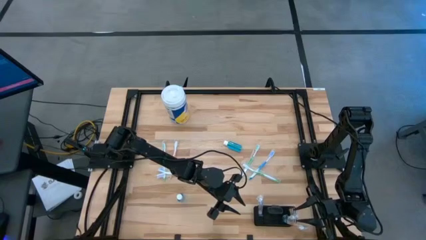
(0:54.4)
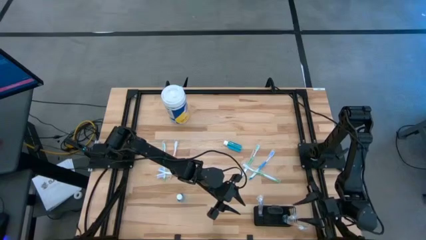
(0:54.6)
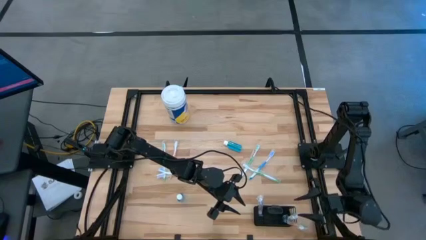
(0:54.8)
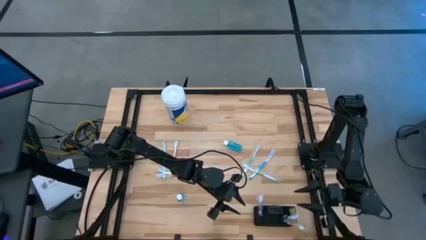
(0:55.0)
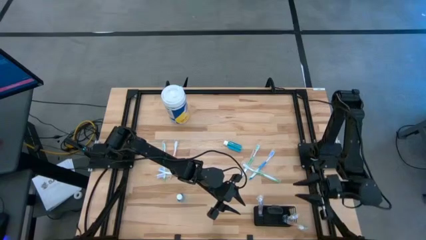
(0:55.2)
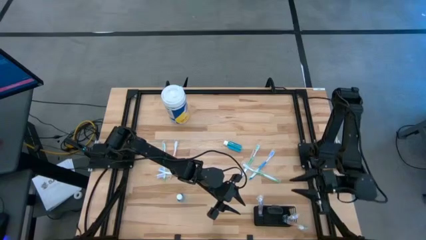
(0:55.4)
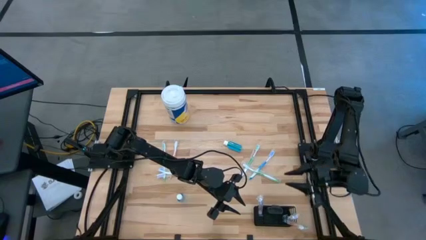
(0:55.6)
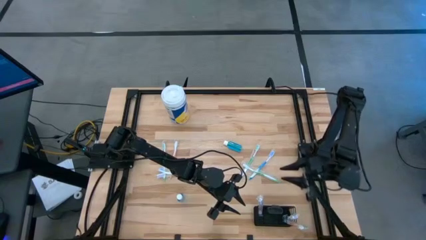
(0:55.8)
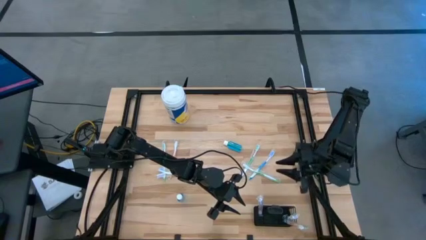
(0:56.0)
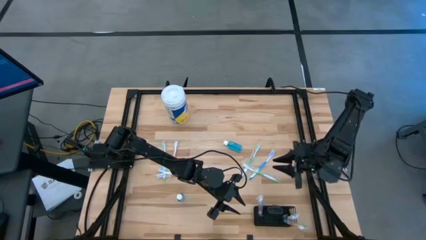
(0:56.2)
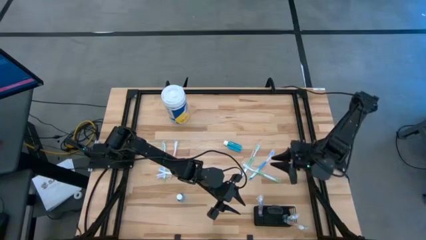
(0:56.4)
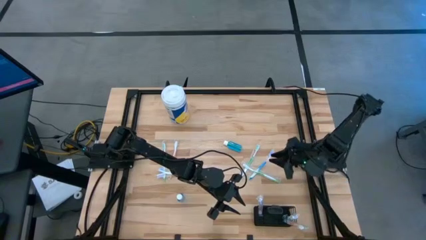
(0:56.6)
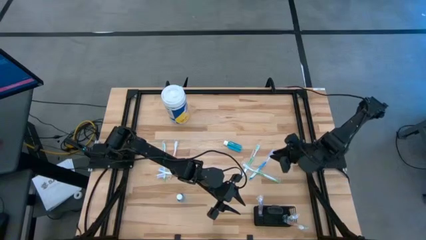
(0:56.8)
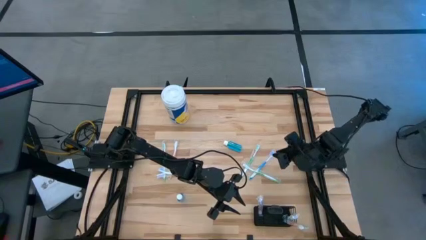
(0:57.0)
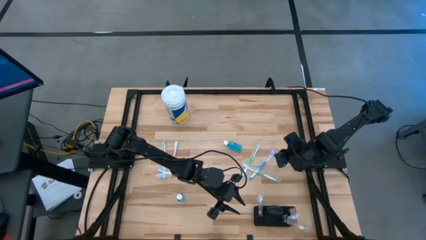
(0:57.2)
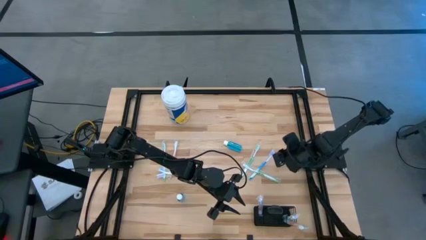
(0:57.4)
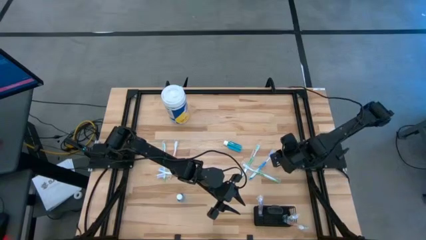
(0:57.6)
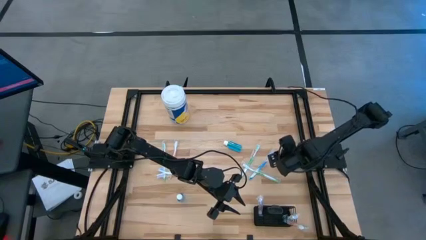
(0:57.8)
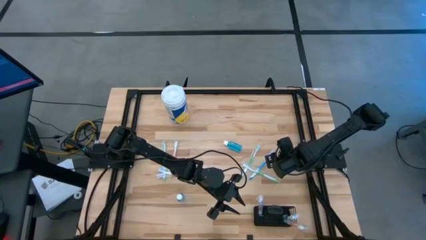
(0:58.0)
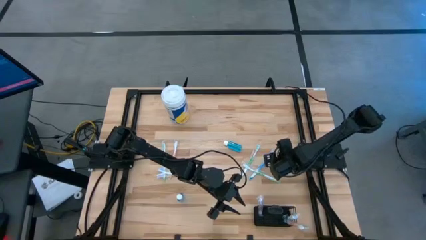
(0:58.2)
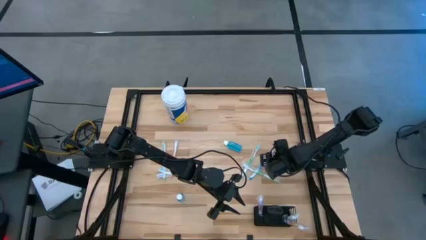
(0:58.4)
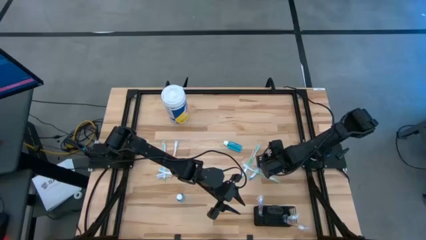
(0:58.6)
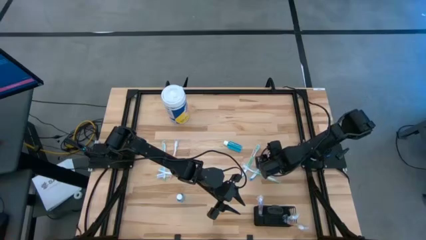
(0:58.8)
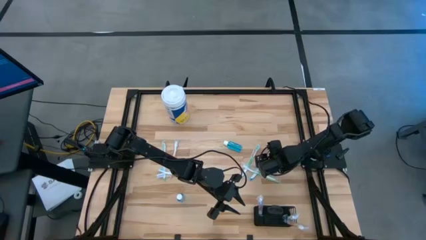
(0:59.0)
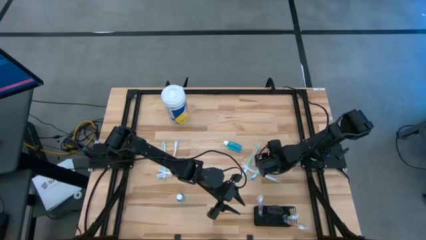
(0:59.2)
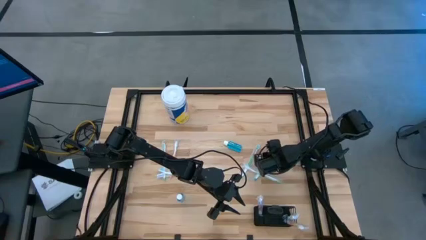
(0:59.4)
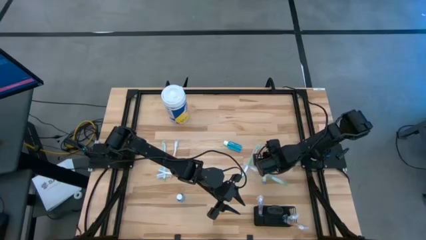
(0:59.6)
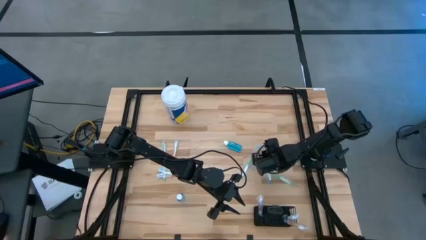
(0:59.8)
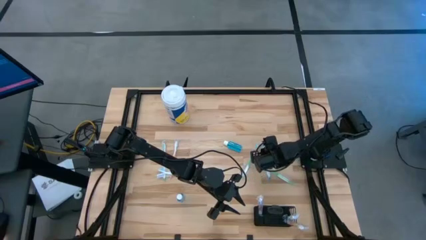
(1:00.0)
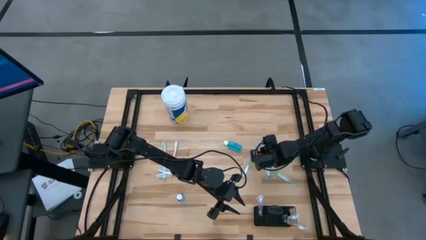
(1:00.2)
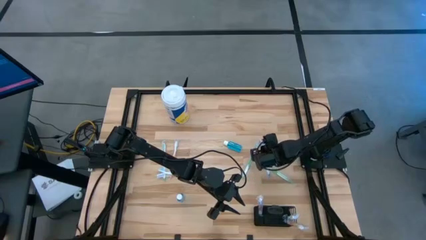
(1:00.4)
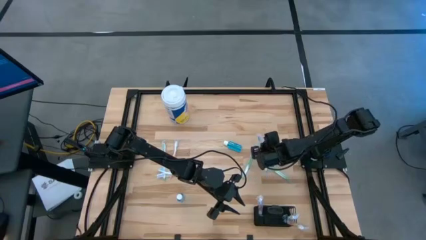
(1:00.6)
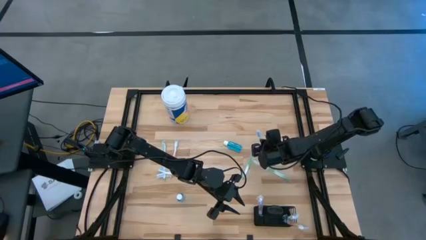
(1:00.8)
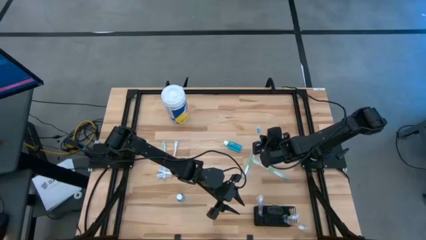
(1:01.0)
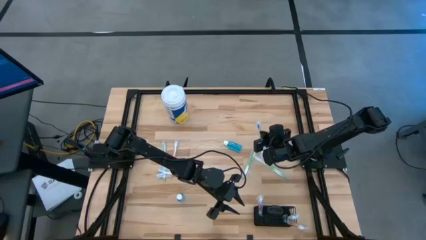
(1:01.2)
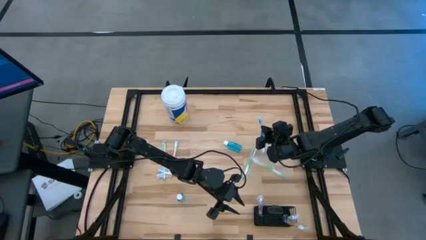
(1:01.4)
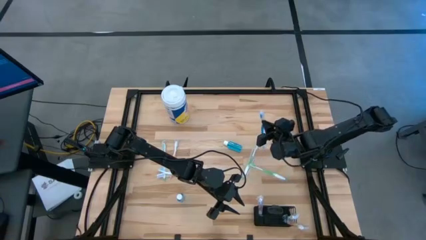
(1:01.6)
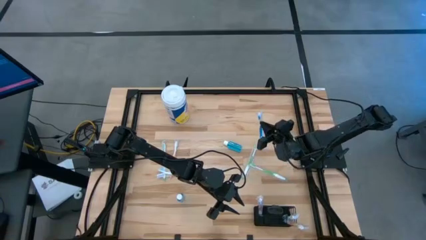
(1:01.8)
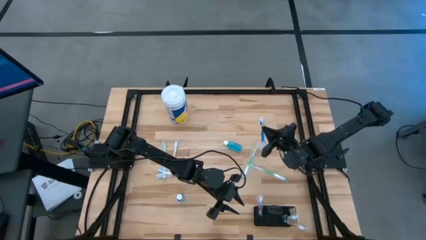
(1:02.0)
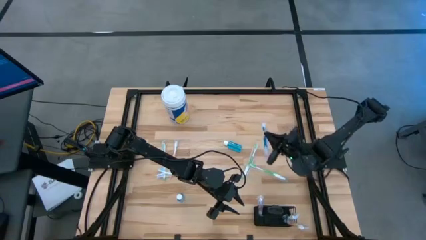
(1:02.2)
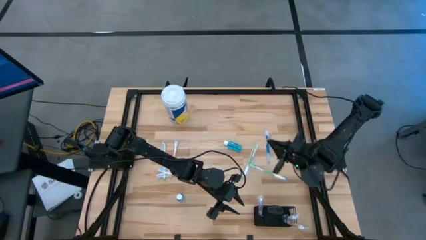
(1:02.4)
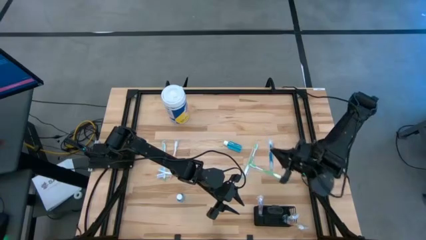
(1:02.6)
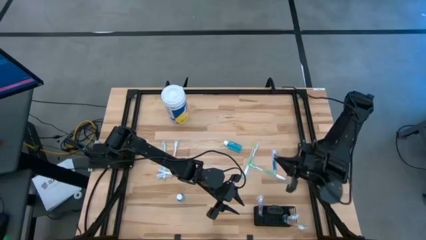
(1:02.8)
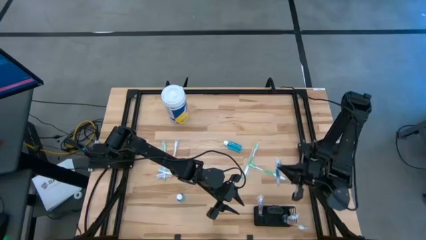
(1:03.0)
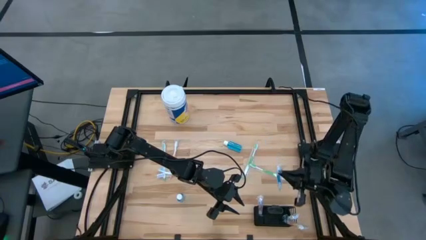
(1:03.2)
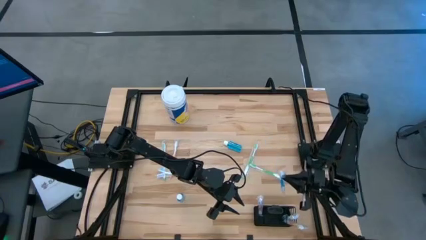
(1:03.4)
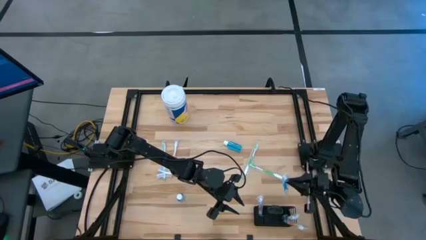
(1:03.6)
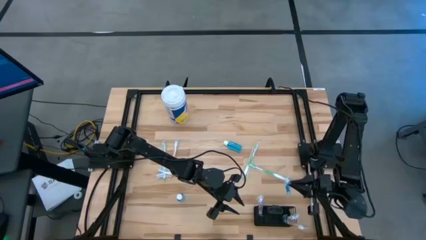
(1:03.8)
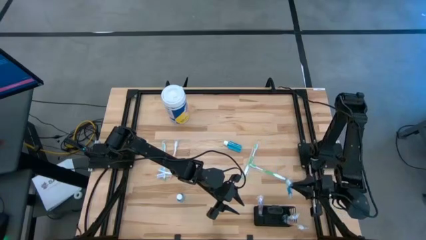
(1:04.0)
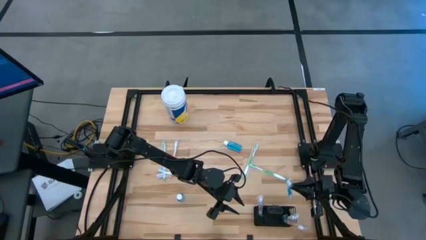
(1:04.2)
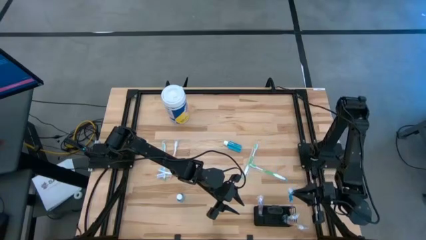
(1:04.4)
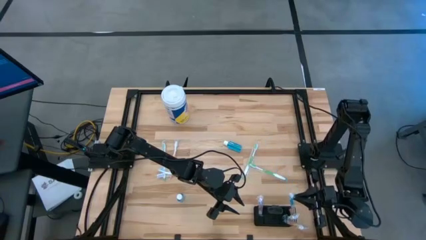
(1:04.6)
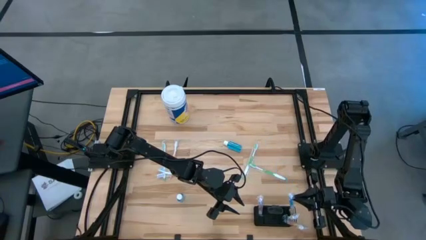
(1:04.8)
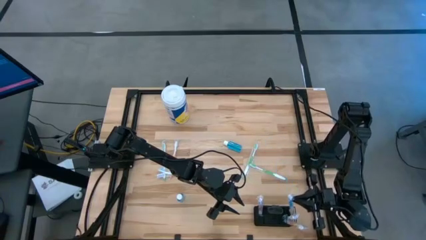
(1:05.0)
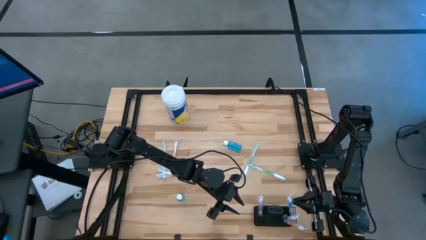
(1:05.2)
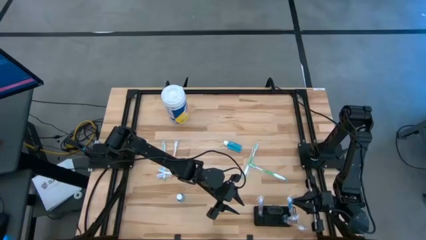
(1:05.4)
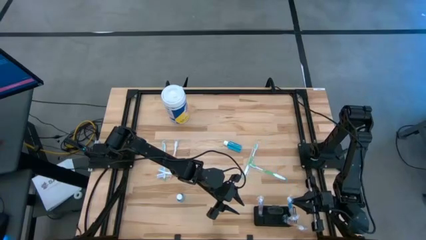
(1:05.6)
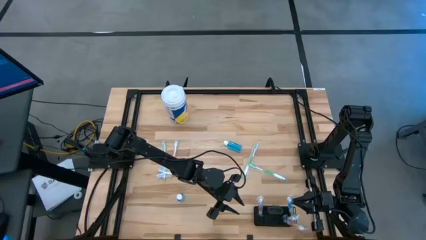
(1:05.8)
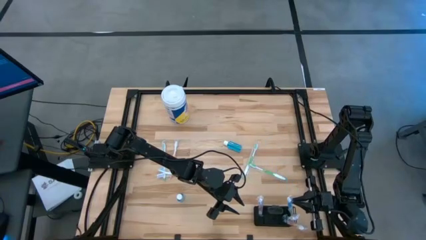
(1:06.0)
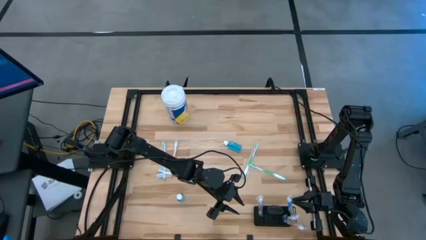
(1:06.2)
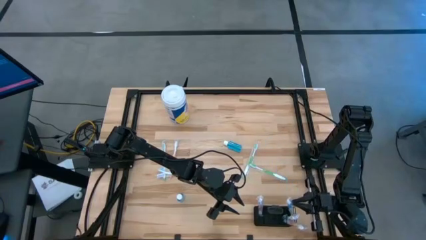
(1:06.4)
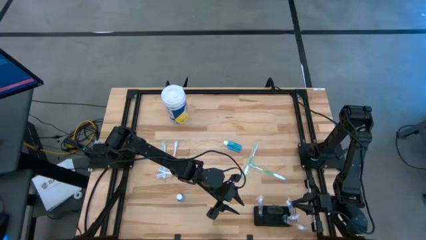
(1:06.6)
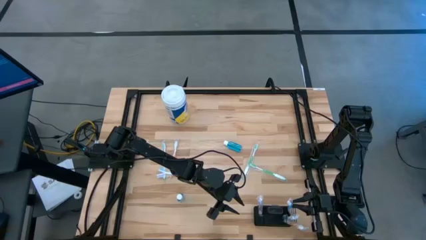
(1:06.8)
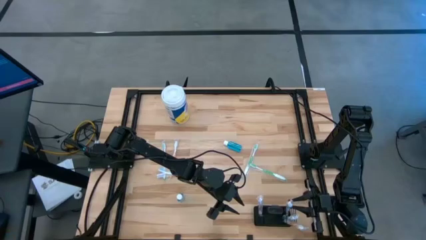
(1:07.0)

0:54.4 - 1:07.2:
Task: Pick & Place toothbrushing station
Put the right blue toothbrush into the wire organizer

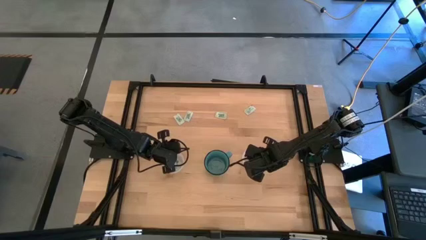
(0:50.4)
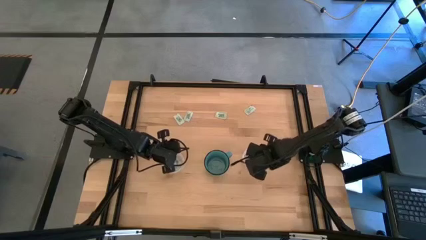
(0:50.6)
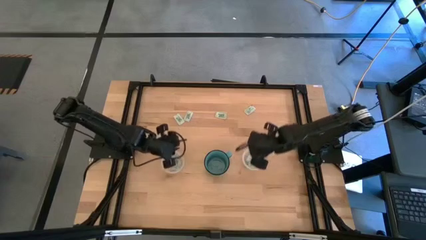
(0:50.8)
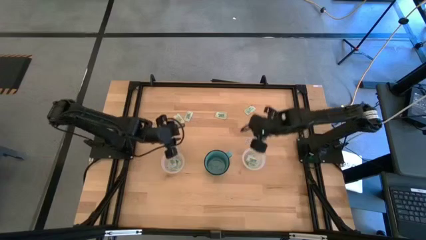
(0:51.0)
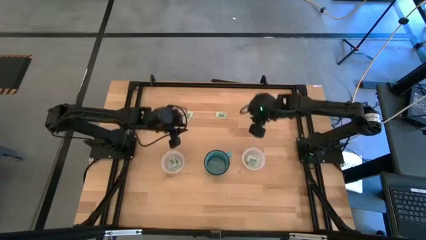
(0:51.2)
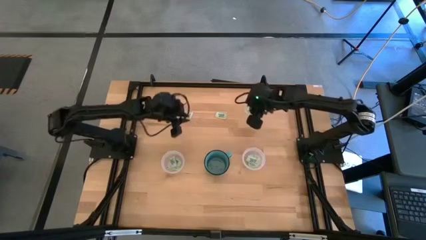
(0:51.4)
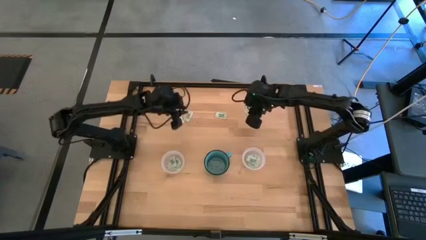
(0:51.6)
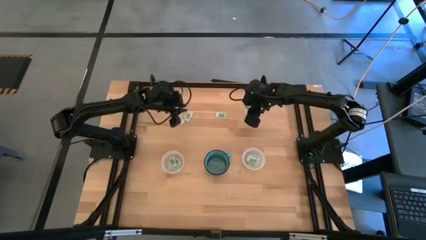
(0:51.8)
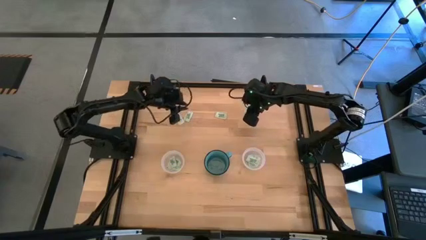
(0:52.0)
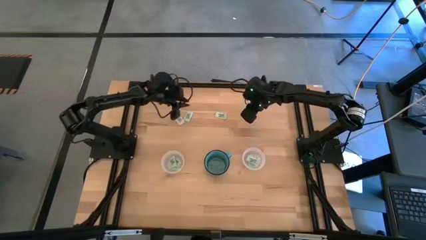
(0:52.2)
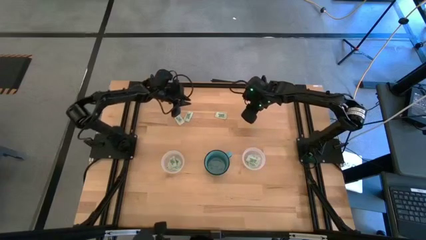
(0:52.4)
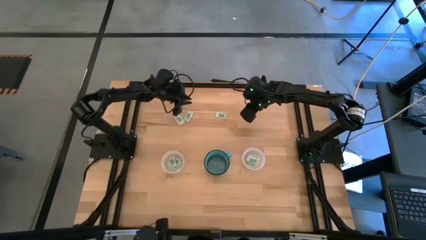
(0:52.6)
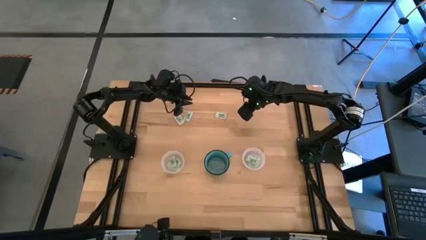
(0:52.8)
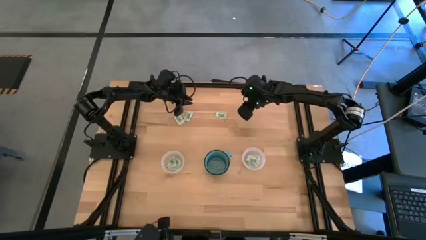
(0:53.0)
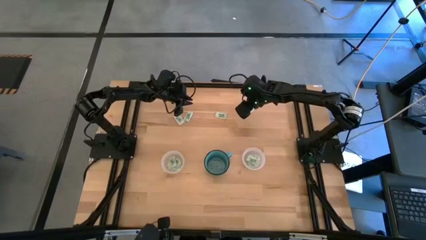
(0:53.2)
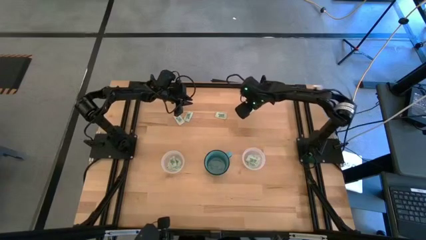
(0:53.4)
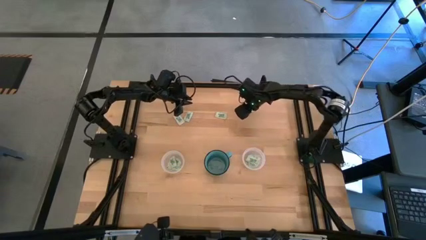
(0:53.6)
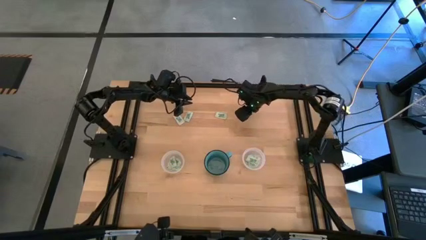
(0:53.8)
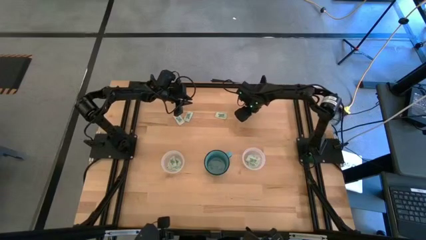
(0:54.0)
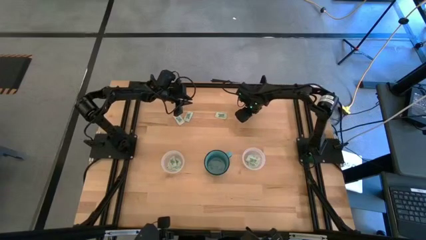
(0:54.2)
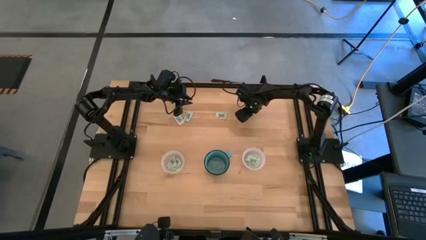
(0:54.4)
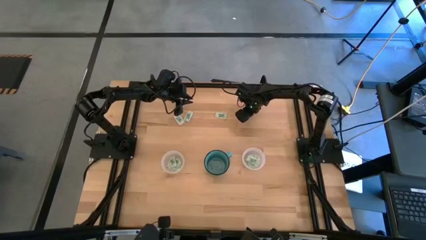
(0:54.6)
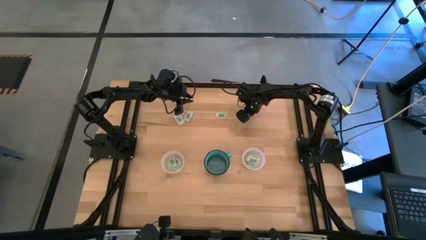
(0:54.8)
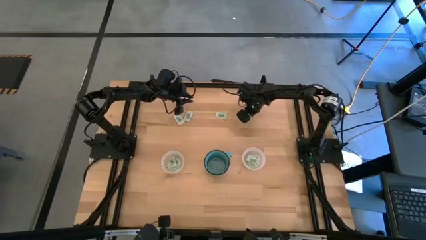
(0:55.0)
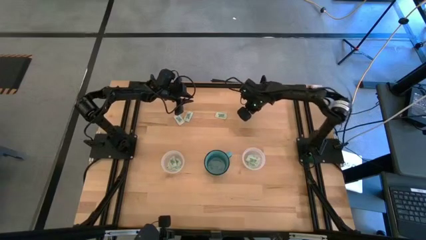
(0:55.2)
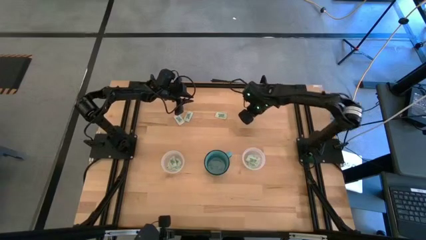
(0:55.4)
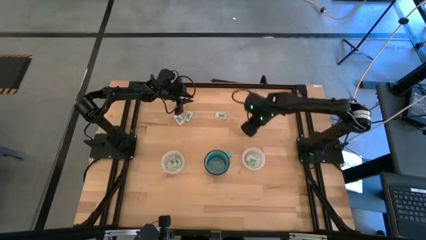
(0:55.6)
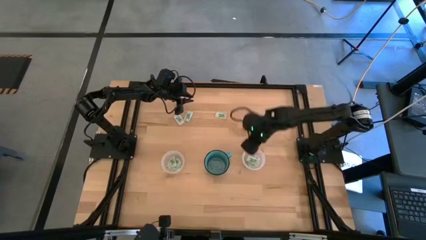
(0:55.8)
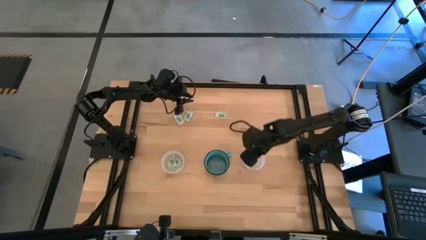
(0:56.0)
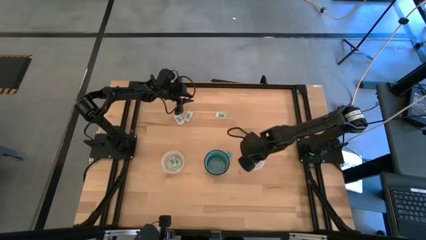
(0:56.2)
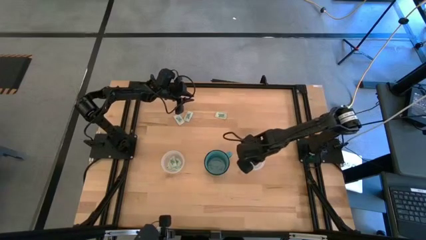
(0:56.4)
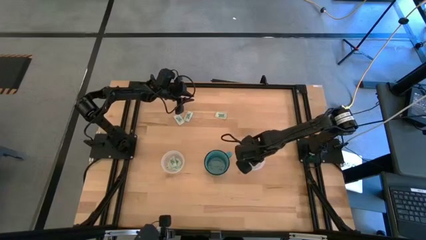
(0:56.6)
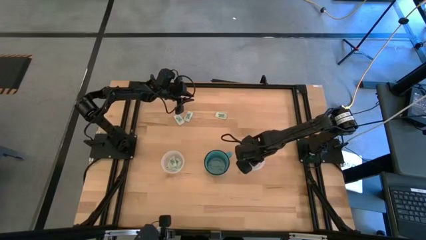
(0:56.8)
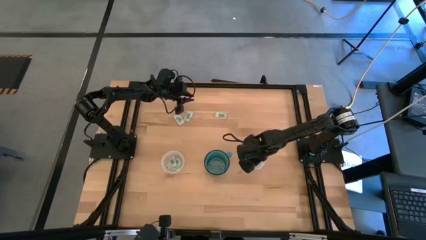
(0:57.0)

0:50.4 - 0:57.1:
Task: Pick and place Stevia / Truvia into bins
Put the green stevia packet into the right transparent container
